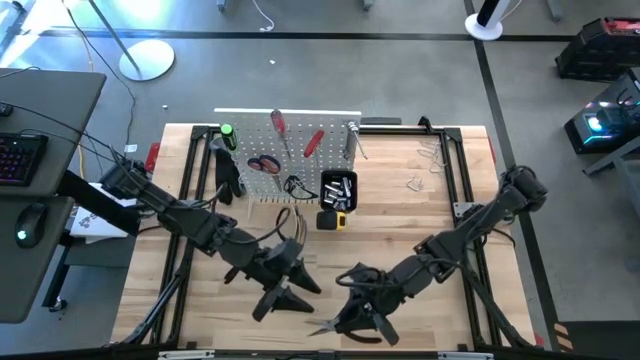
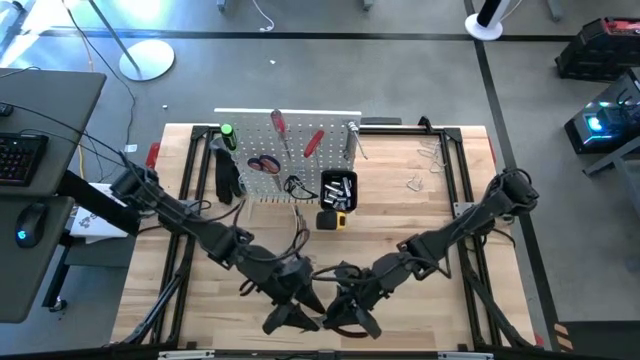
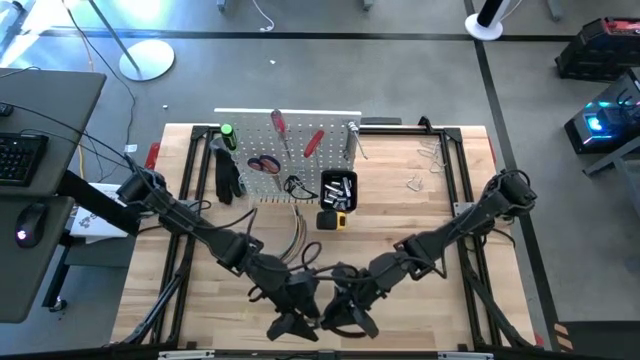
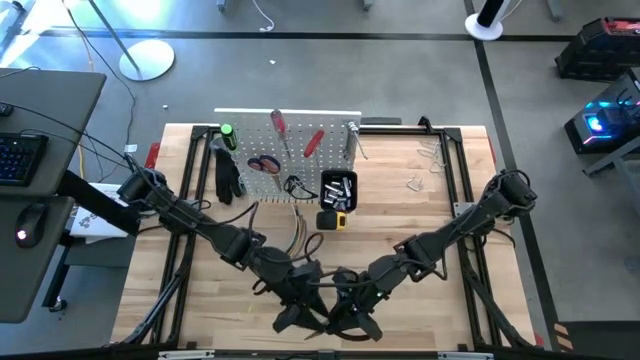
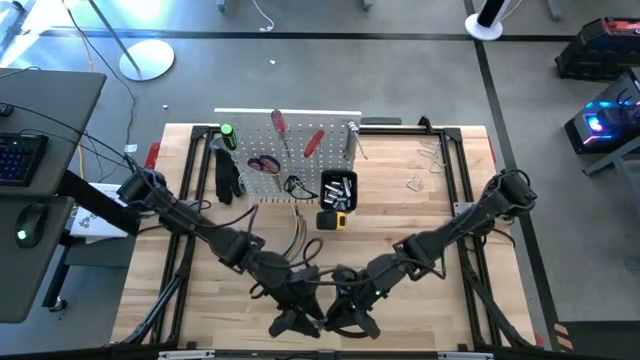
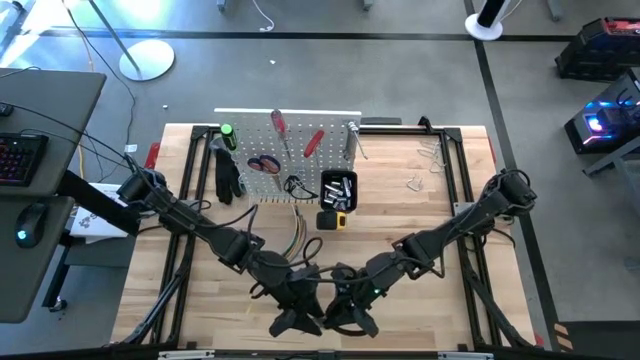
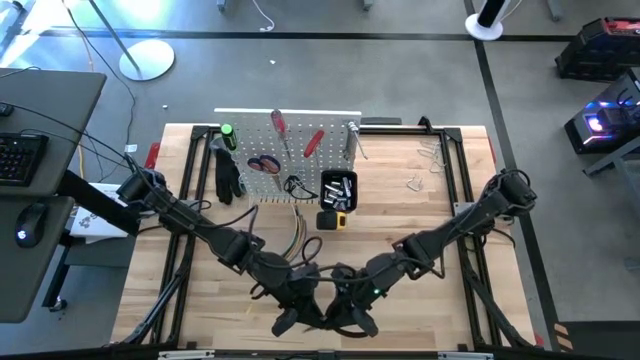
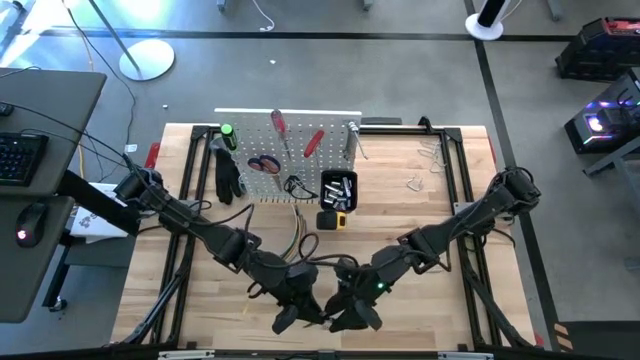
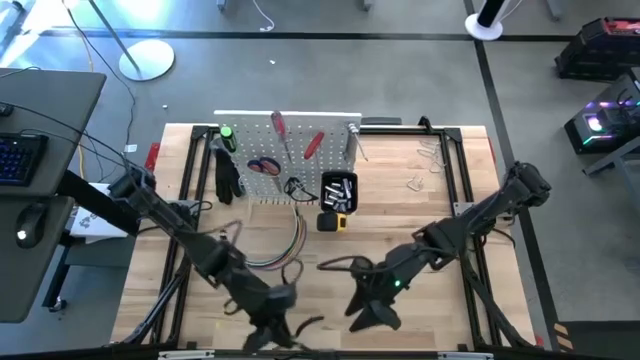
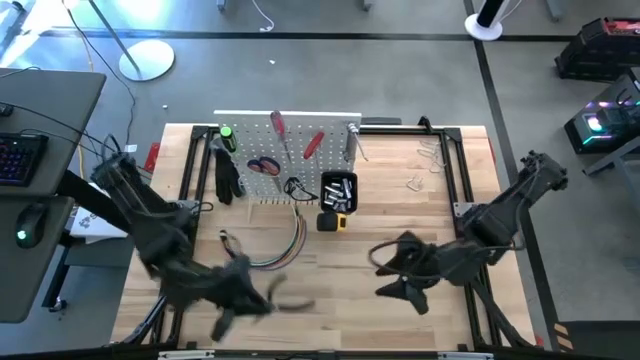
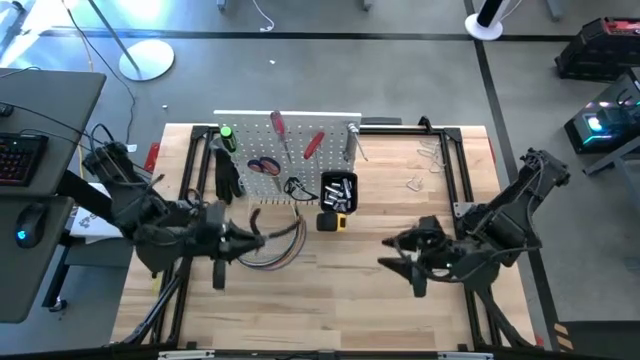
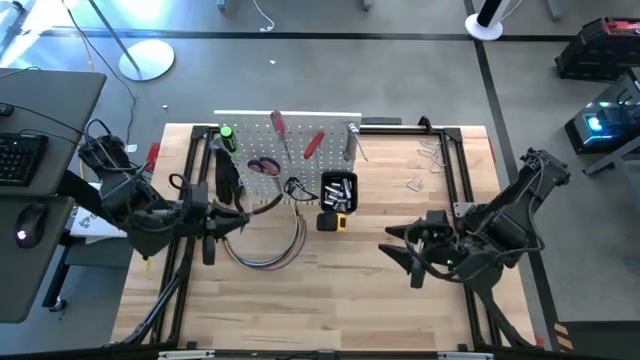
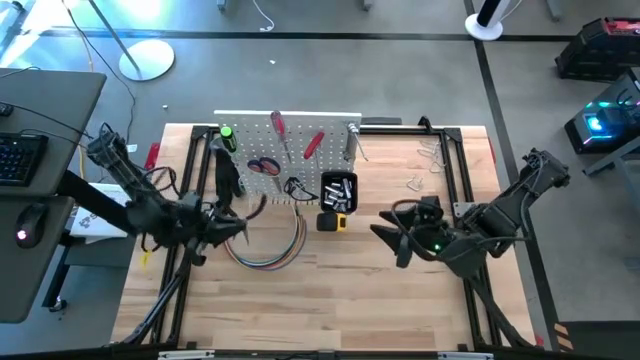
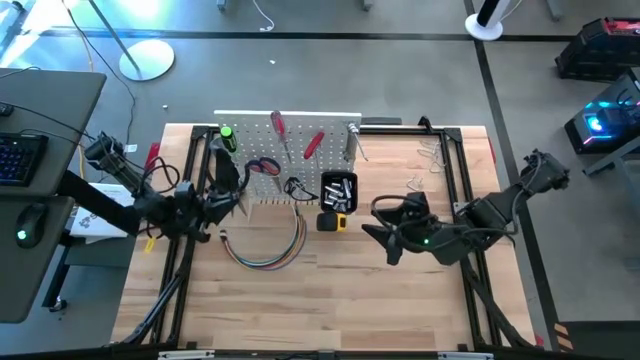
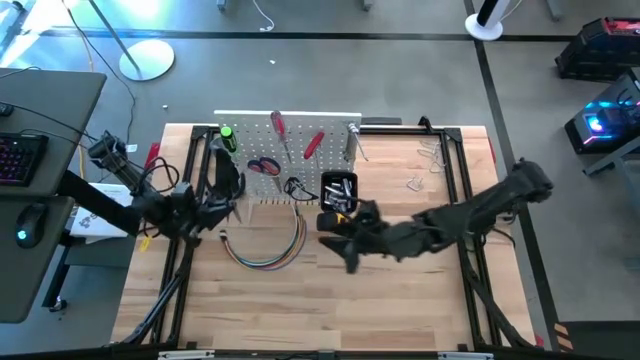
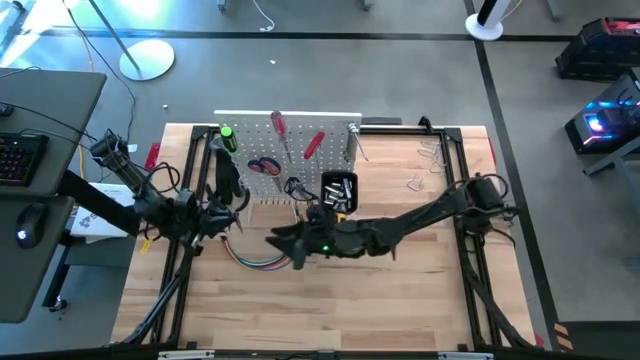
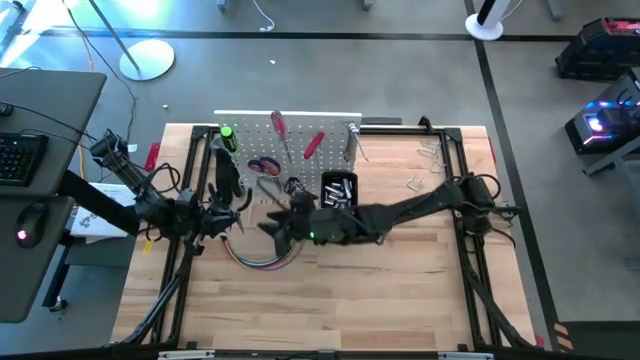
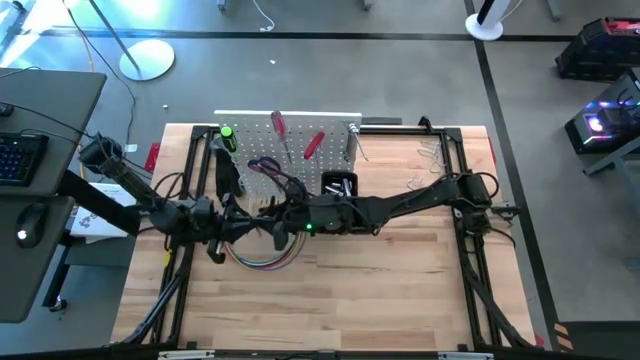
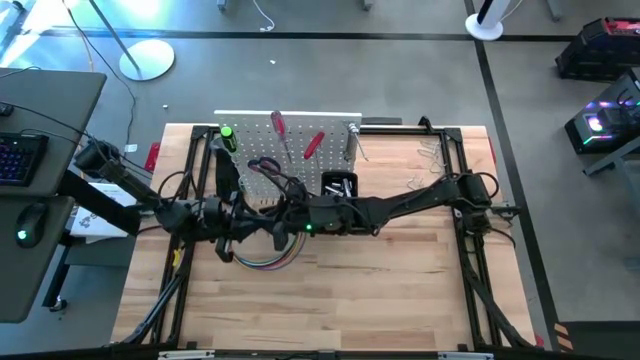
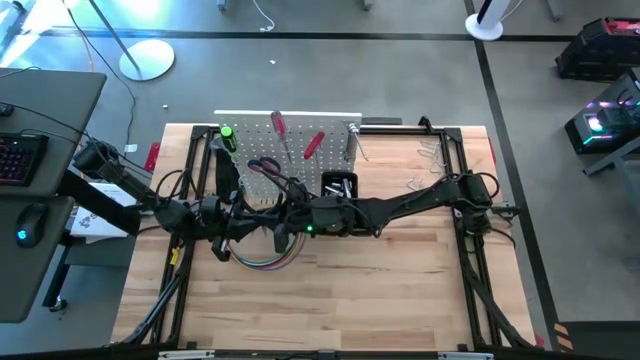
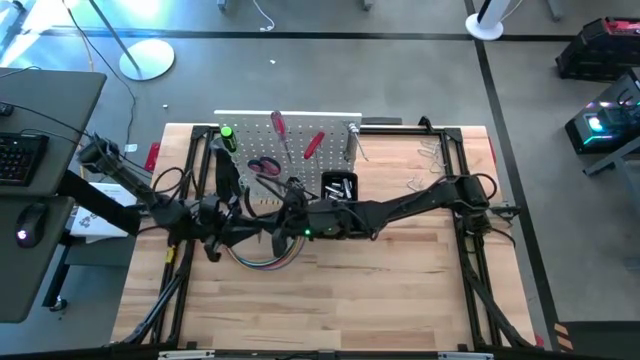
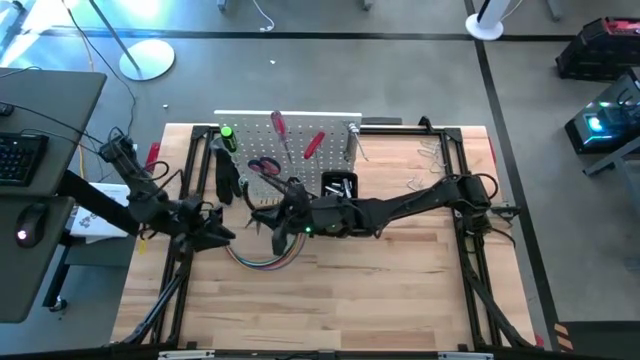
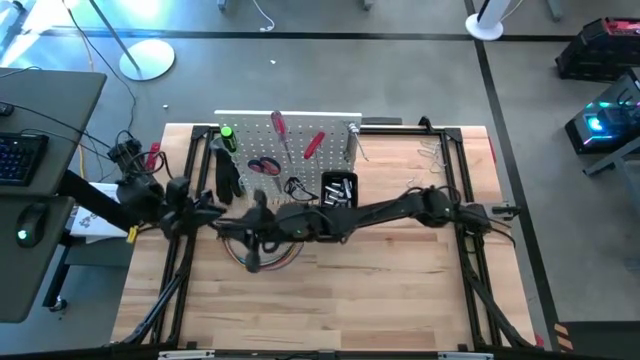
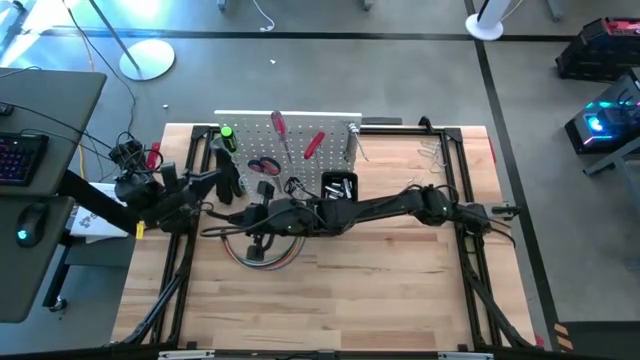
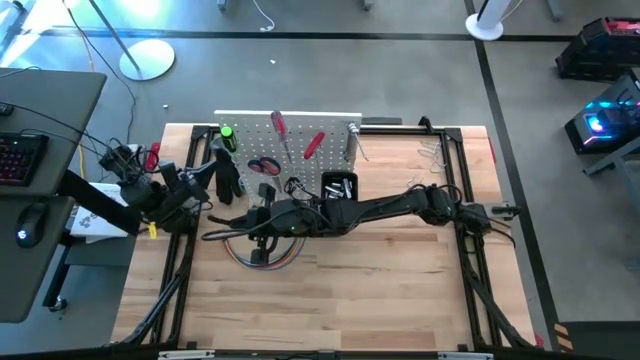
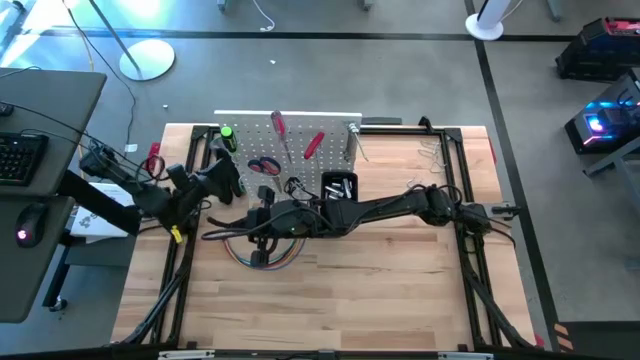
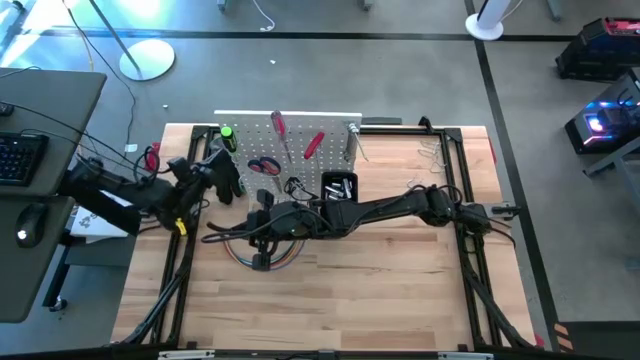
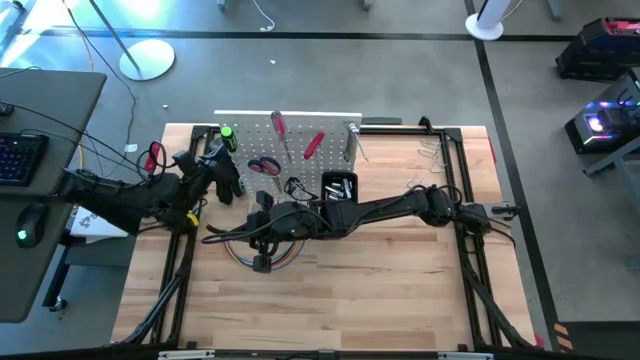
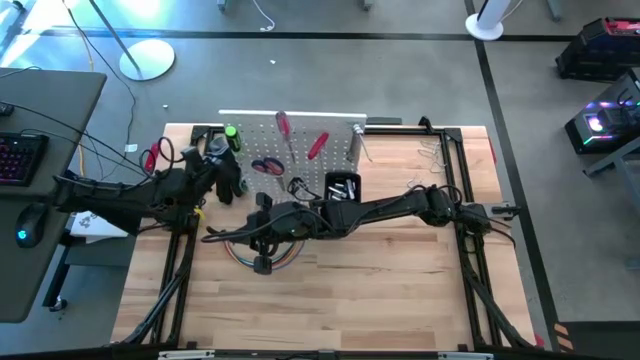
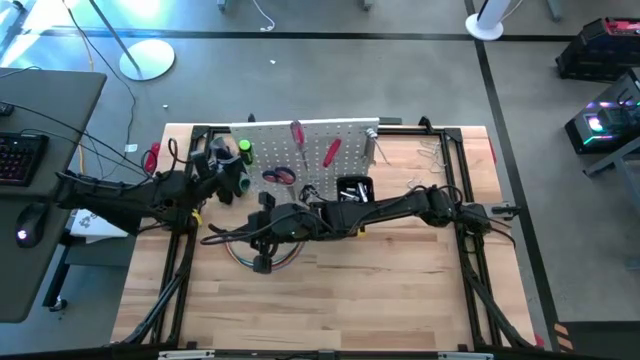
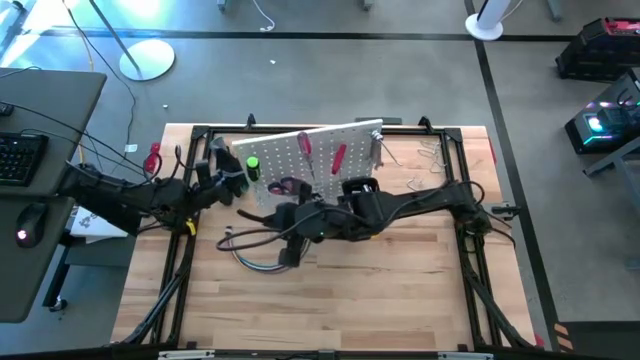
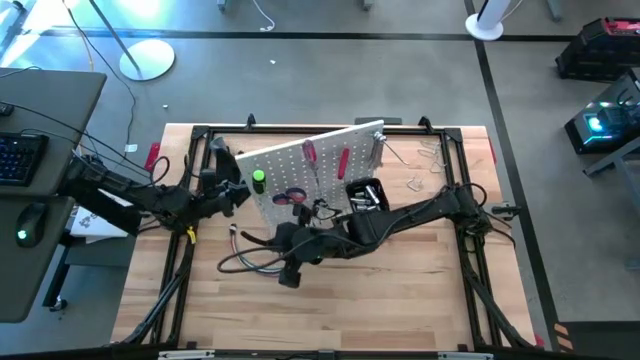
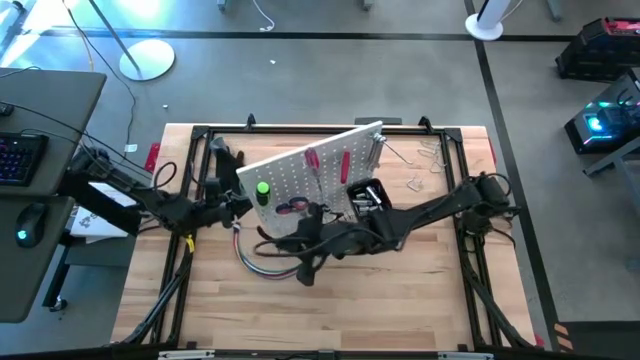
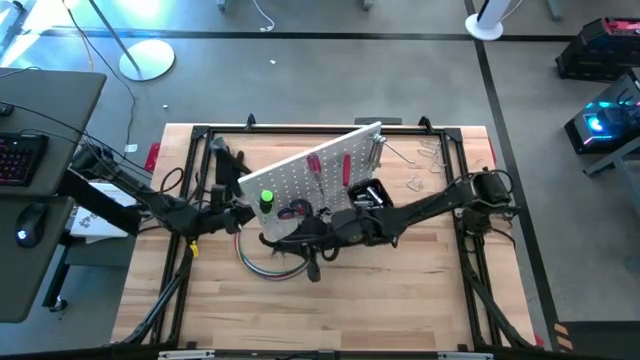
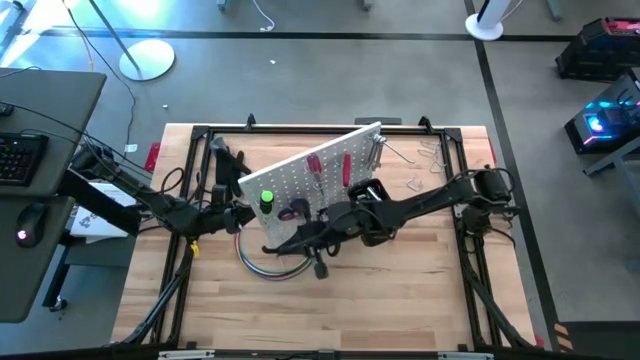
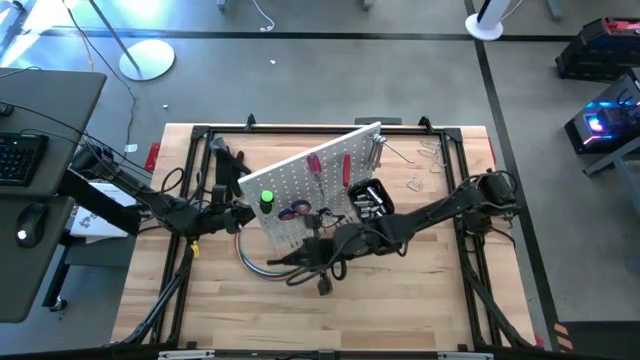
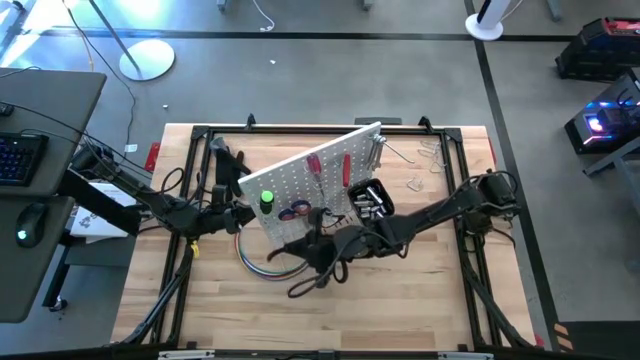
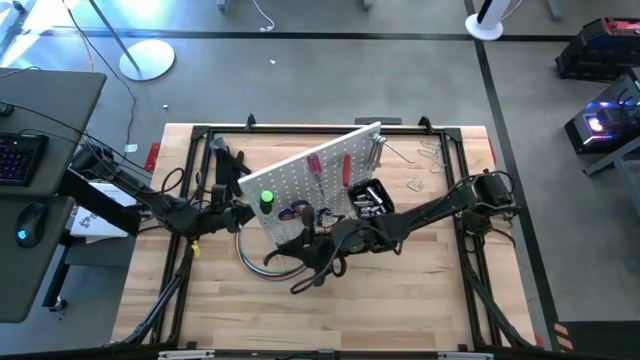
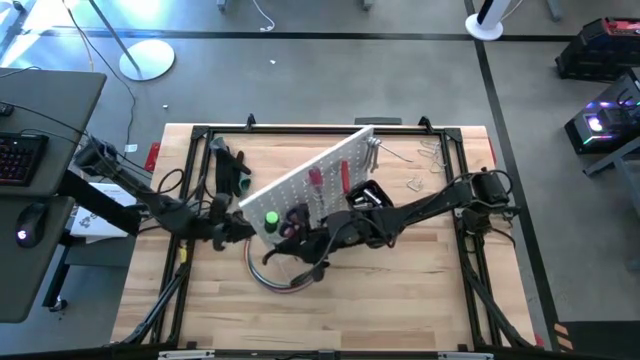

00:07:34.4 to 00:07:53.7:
Task: Hang tools onto peg board
Hang the plier on the peg board
